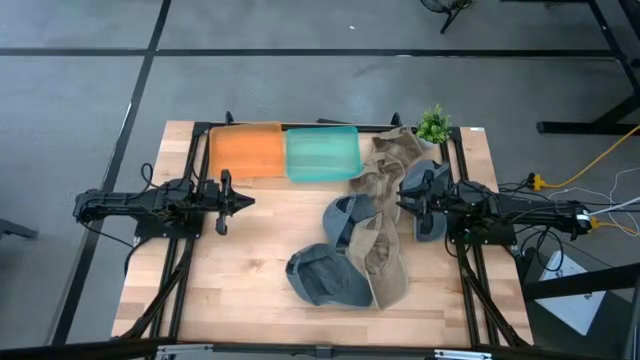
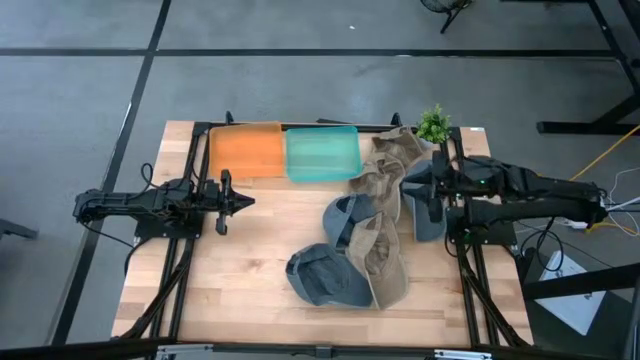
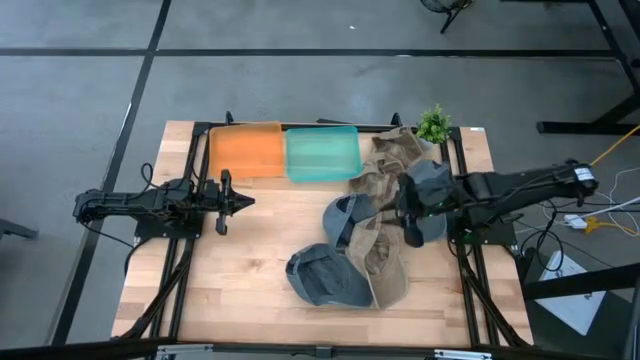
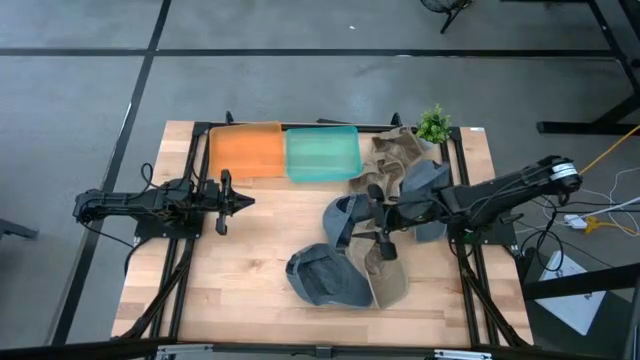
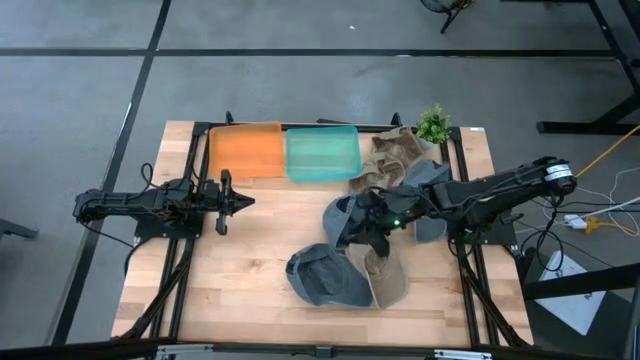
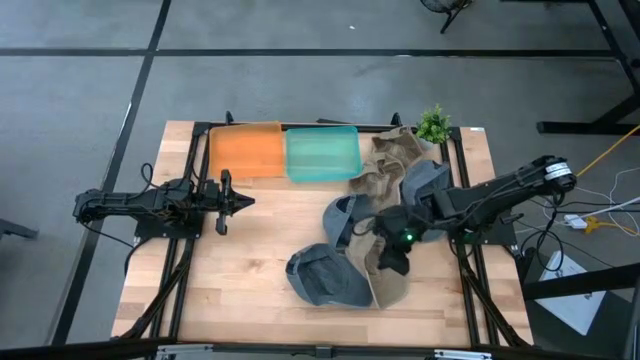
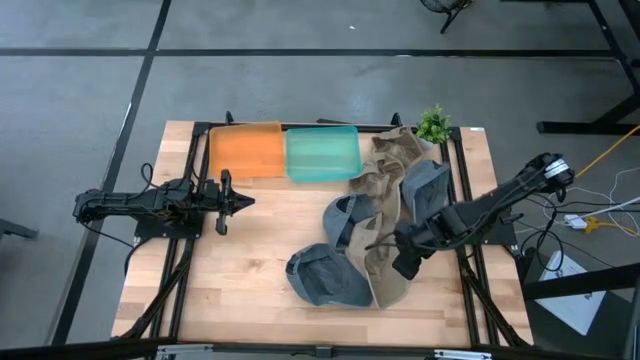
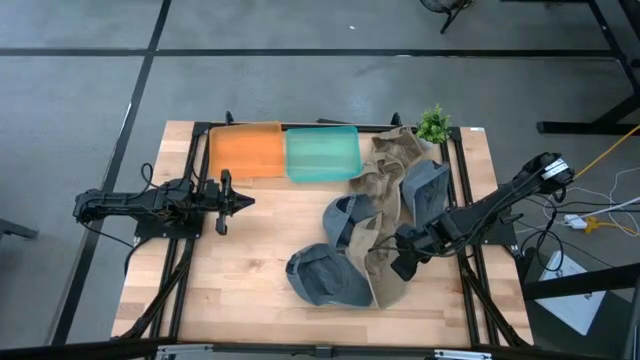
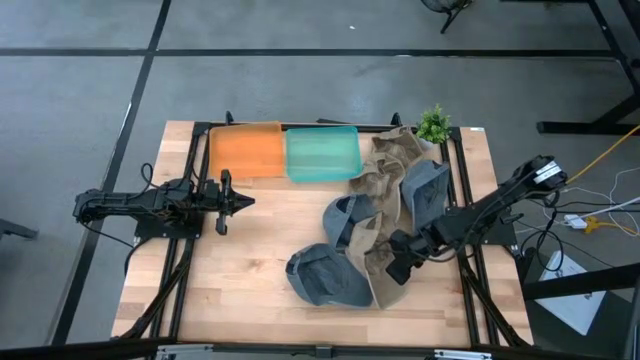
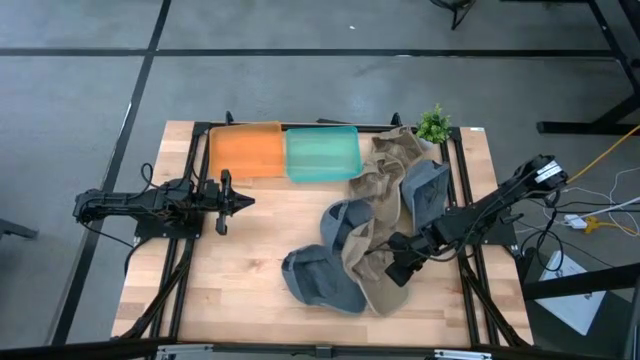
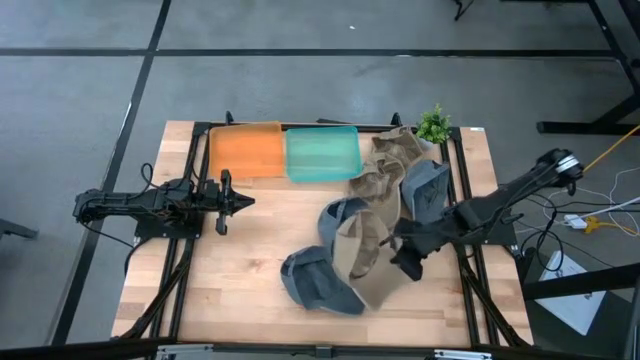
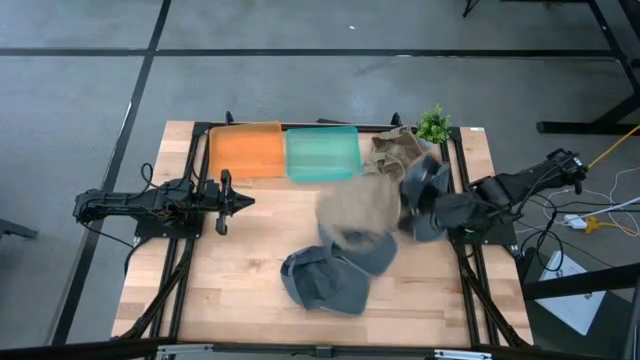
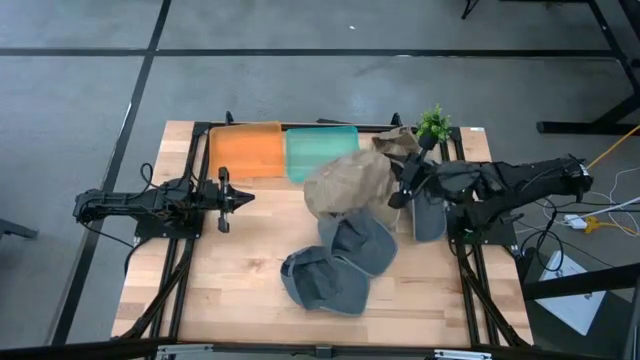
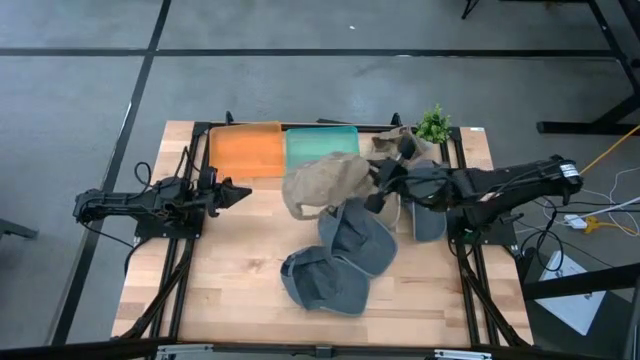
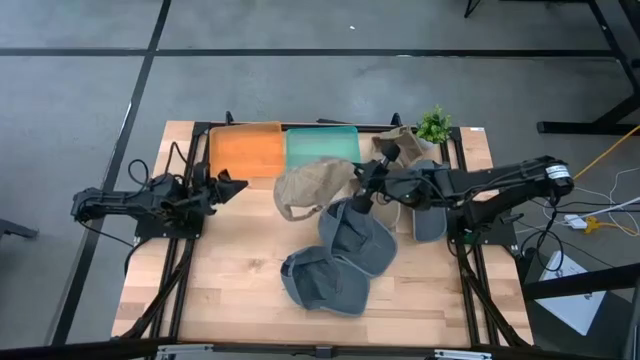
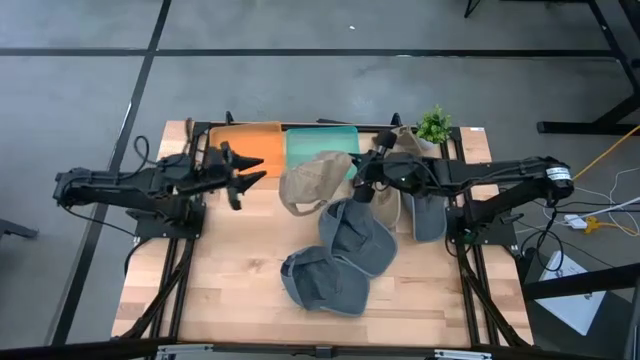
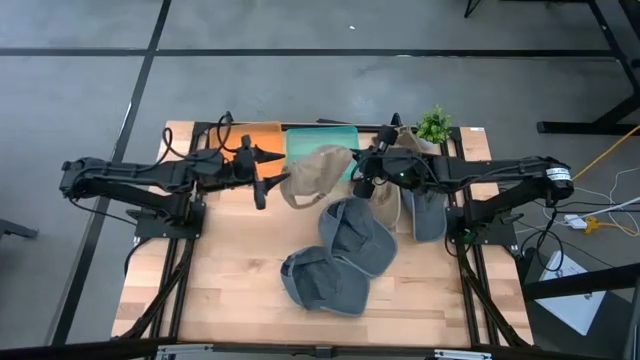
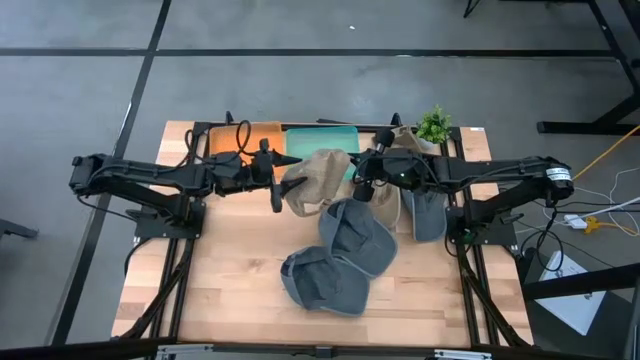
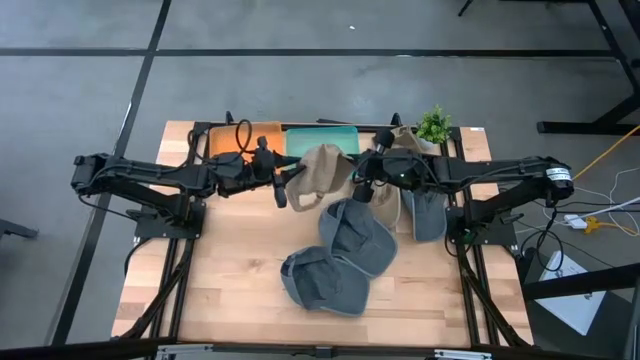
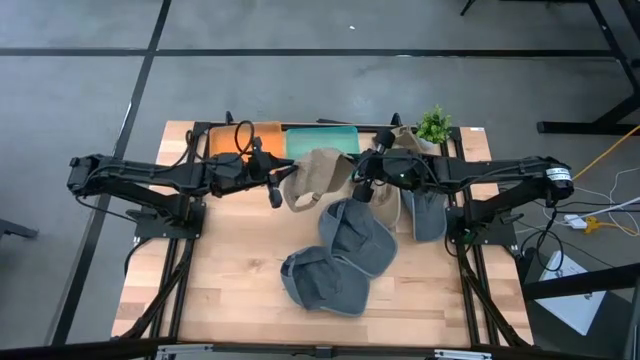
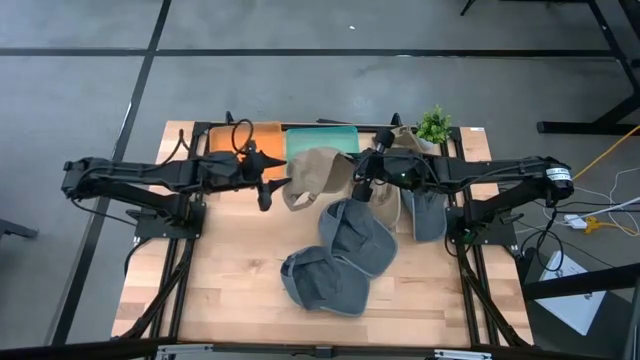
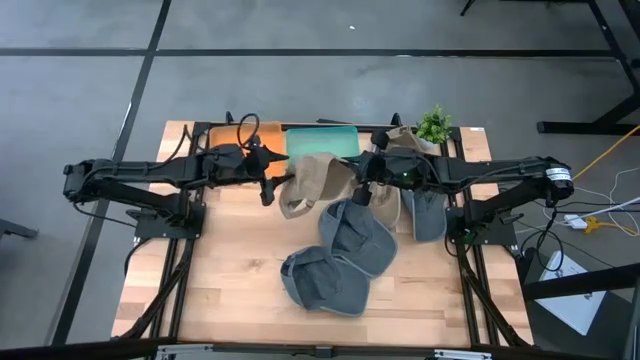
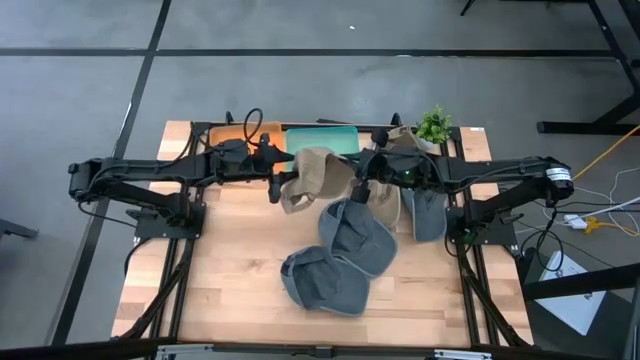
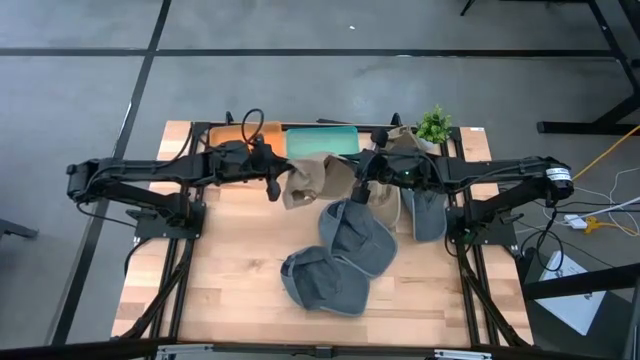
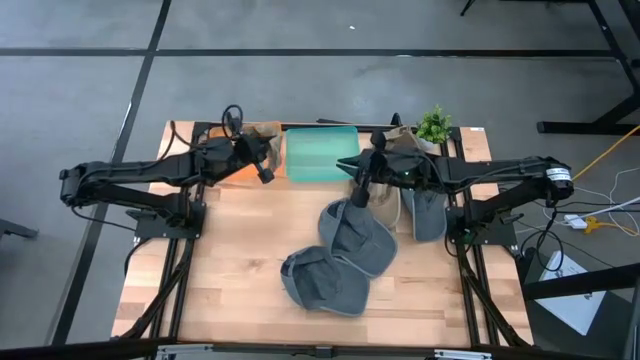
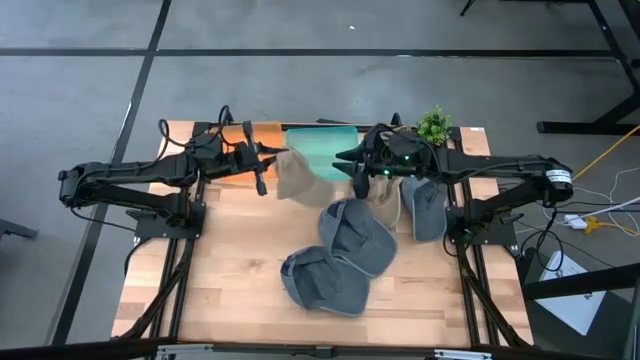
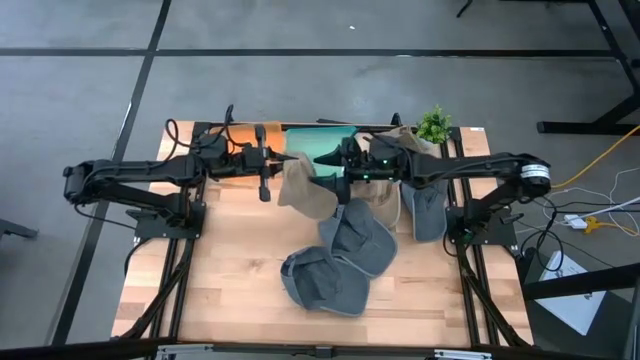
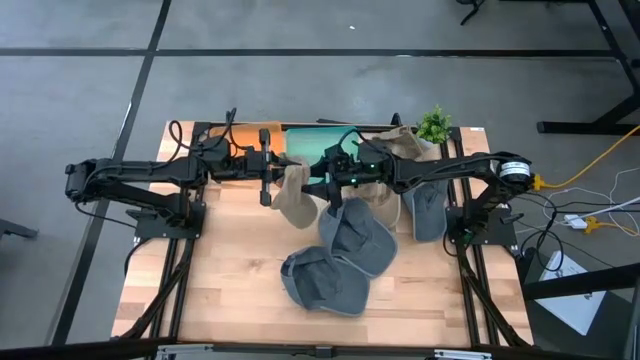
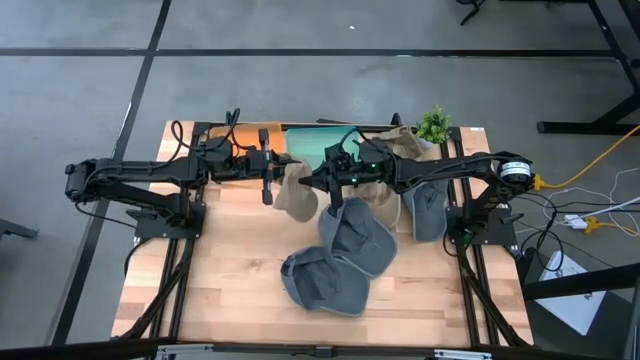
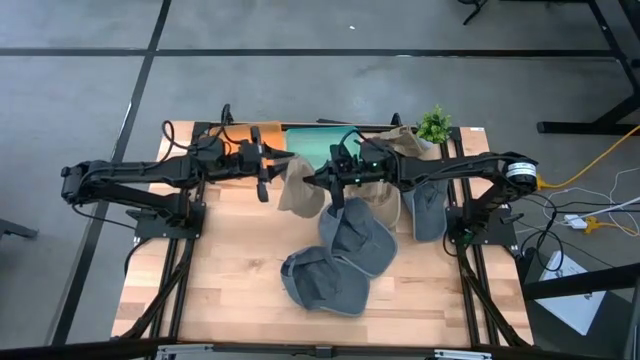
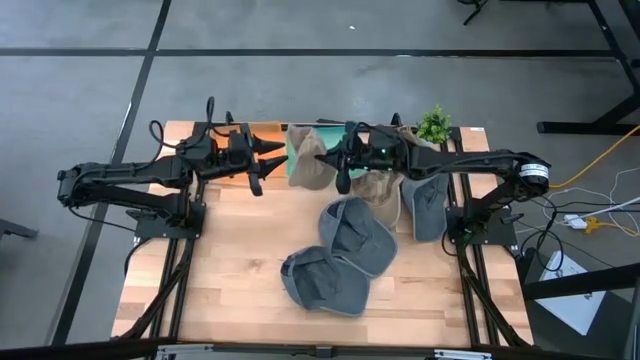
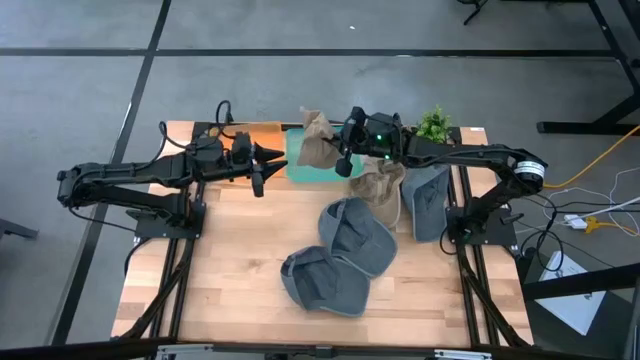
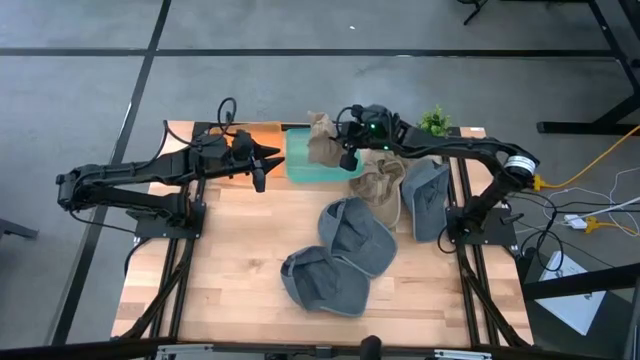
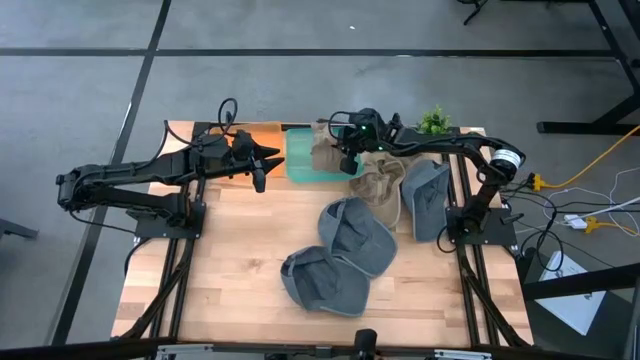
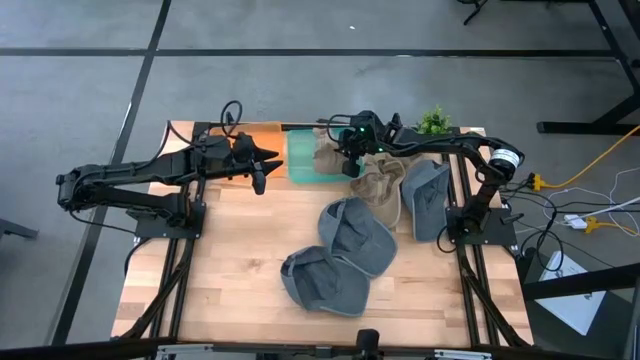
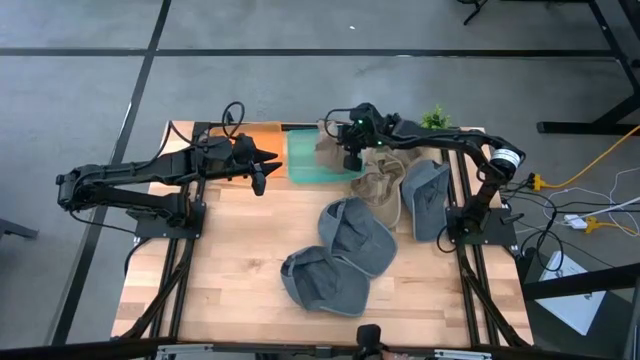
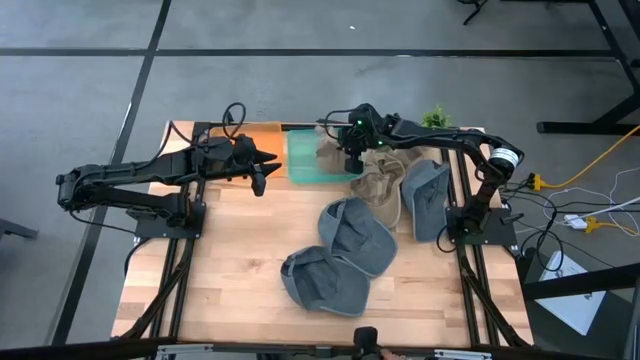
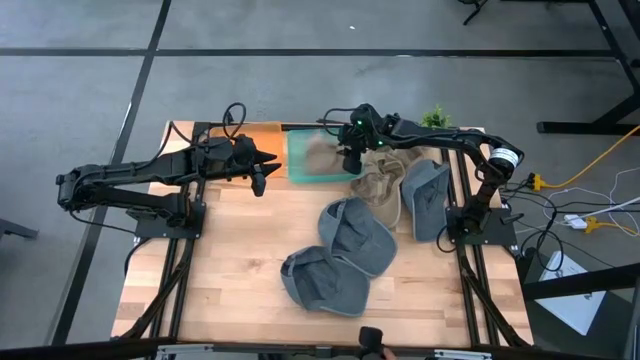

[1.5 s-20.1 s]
Task: Pick & Place hat
Put the bottom brown cap into the green bin

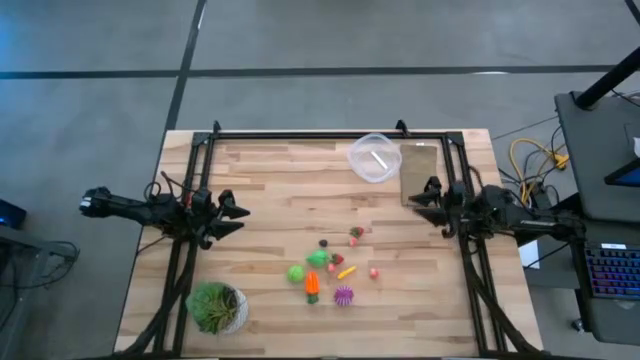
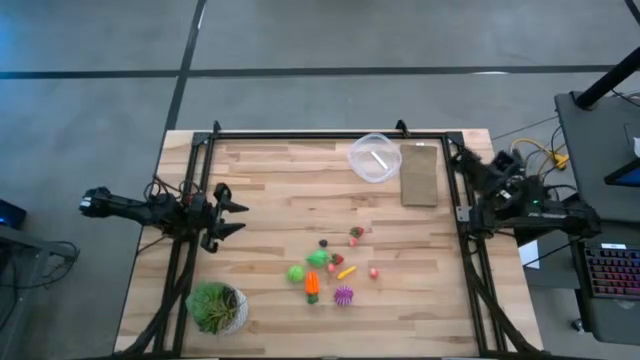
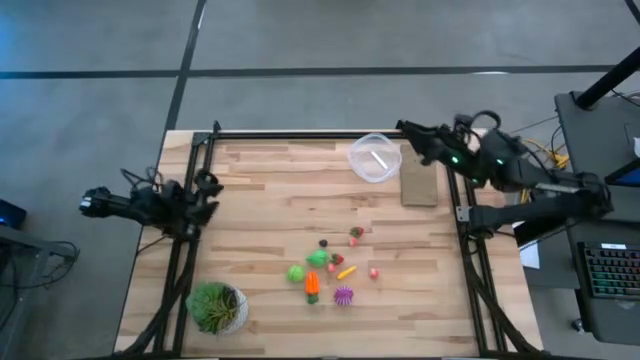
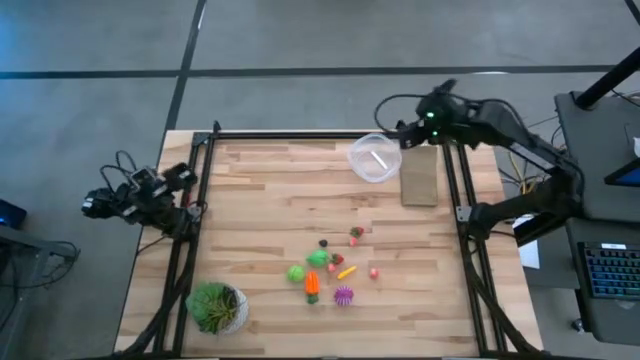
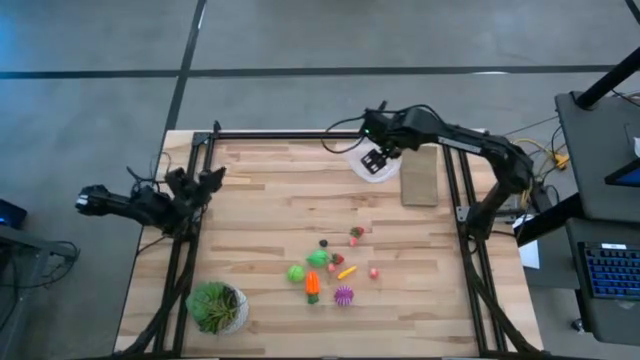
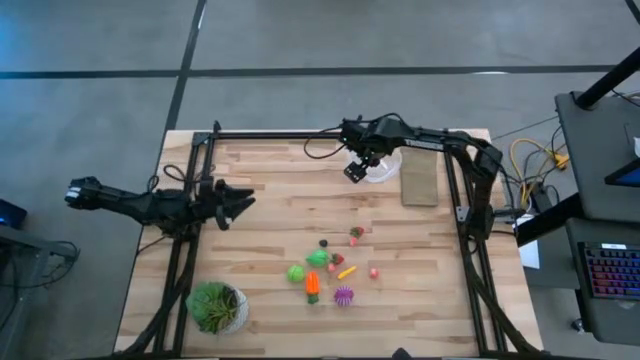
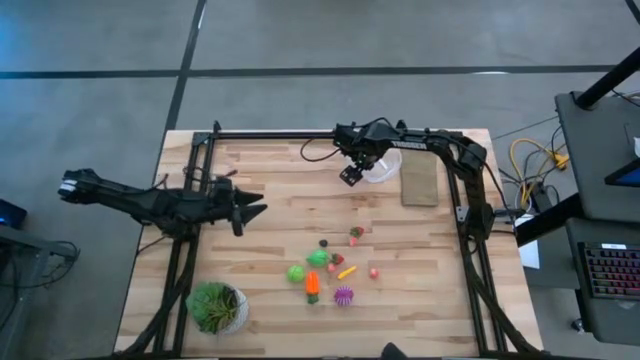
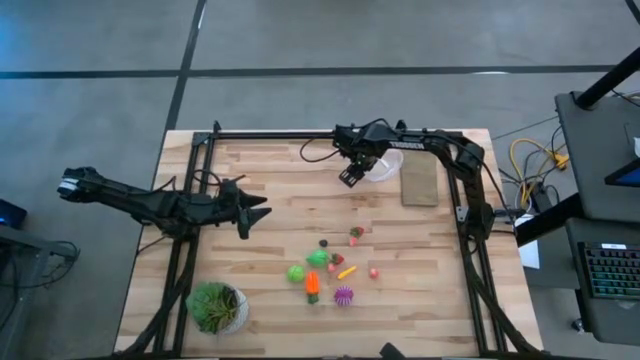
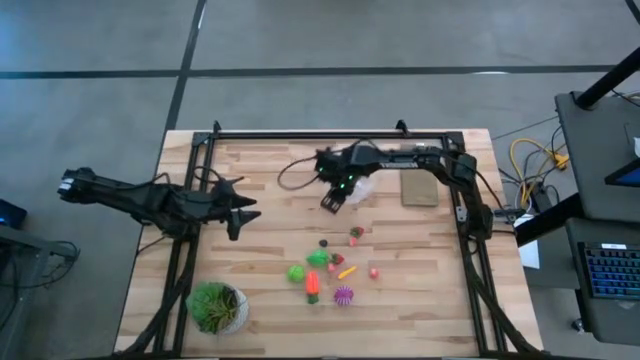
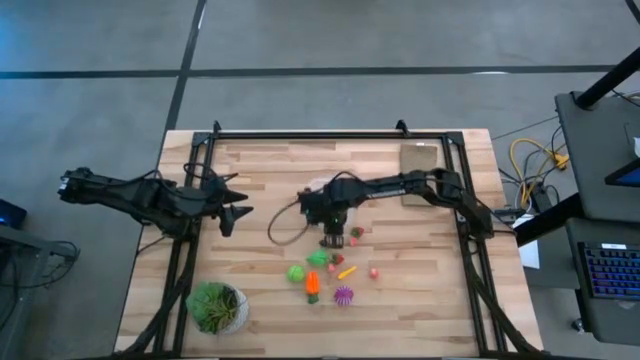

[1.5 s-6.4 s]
Task: Pick and placing Produce into tupperware
Move the transparent container to the center of the table
